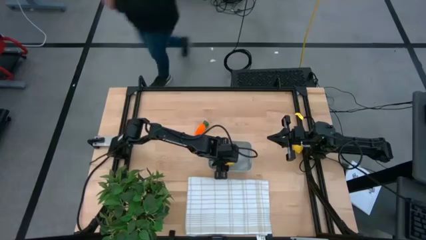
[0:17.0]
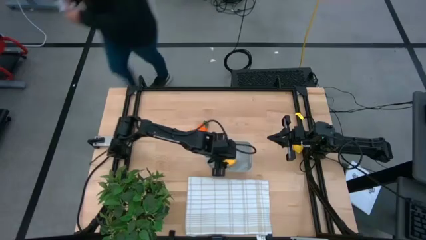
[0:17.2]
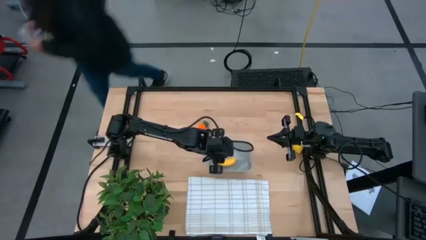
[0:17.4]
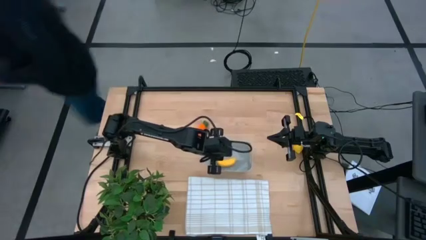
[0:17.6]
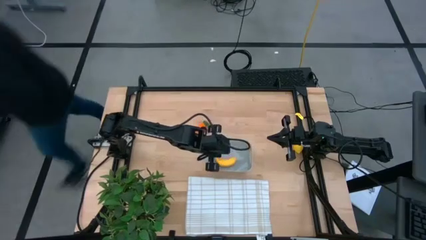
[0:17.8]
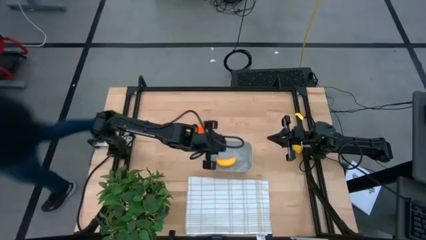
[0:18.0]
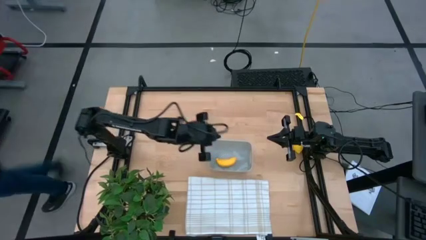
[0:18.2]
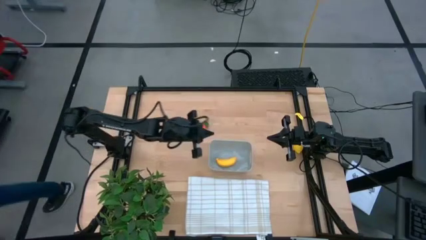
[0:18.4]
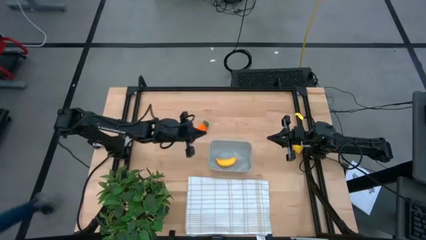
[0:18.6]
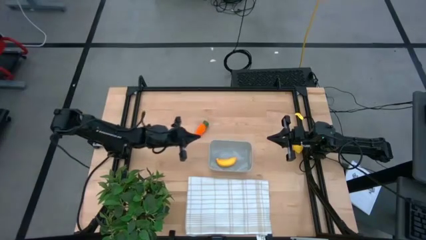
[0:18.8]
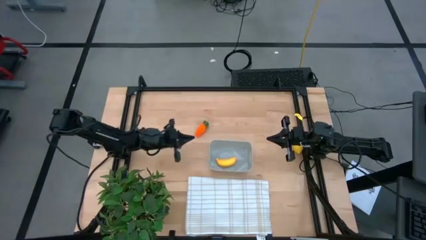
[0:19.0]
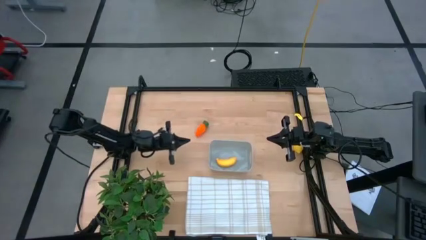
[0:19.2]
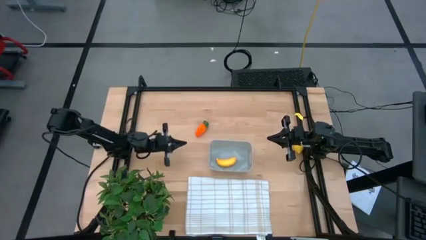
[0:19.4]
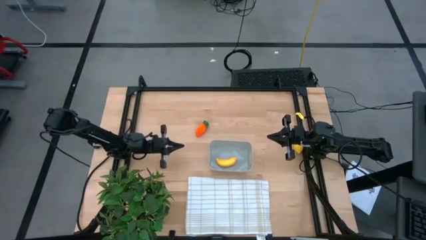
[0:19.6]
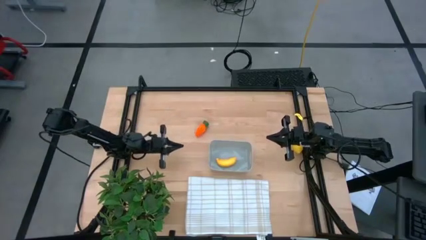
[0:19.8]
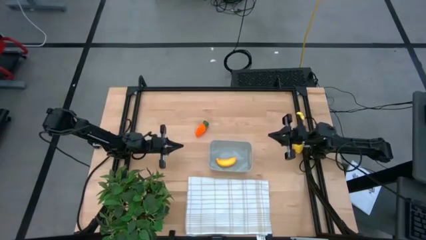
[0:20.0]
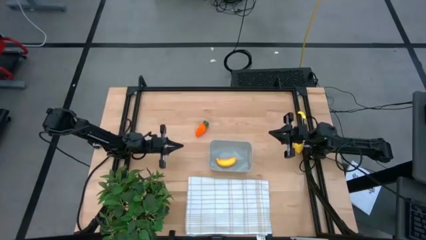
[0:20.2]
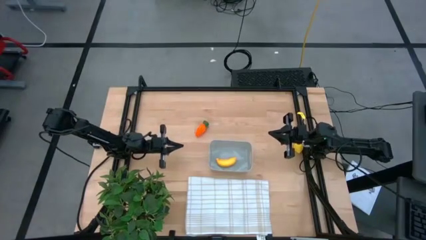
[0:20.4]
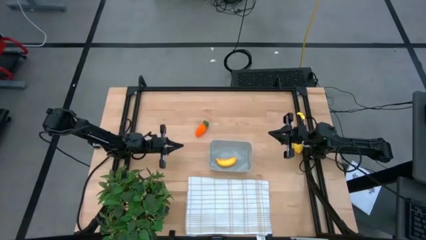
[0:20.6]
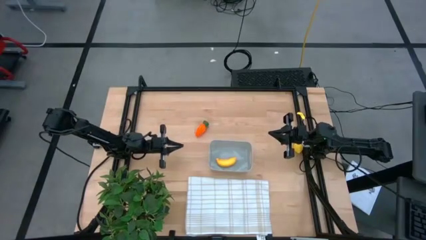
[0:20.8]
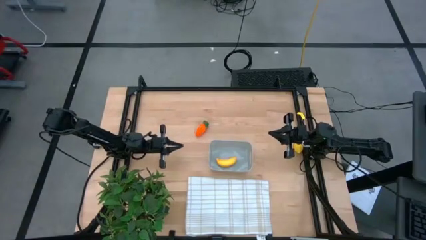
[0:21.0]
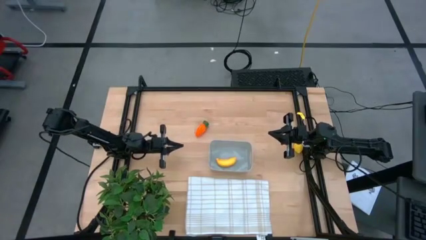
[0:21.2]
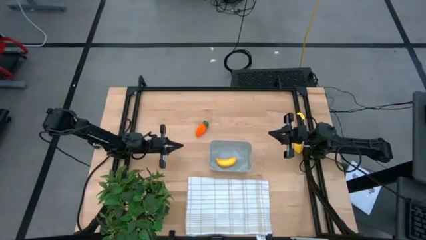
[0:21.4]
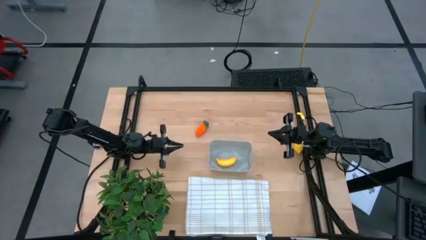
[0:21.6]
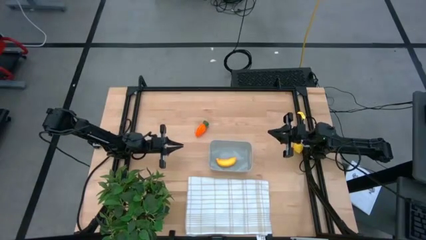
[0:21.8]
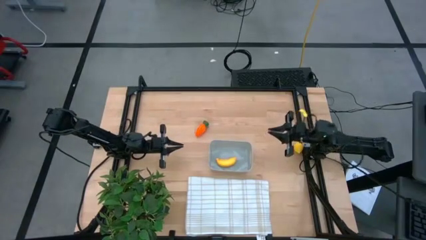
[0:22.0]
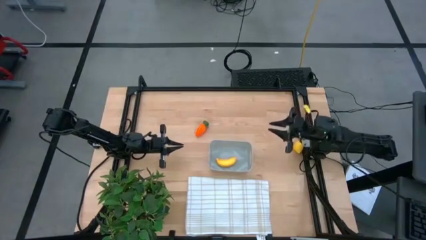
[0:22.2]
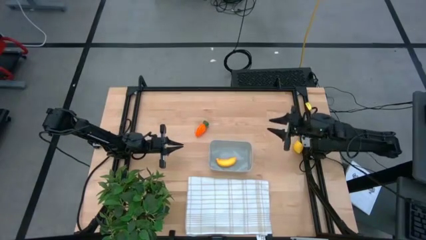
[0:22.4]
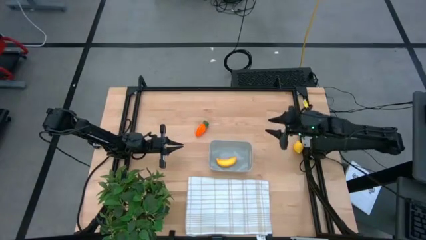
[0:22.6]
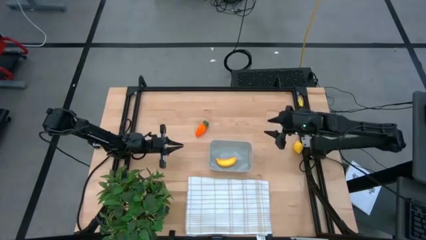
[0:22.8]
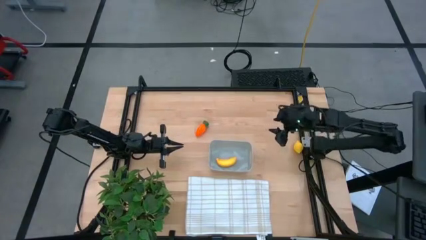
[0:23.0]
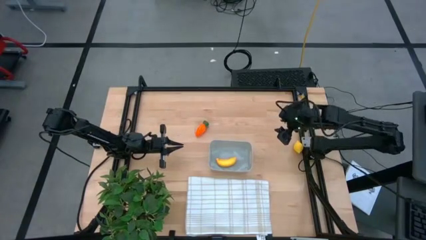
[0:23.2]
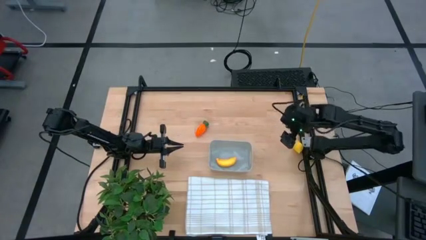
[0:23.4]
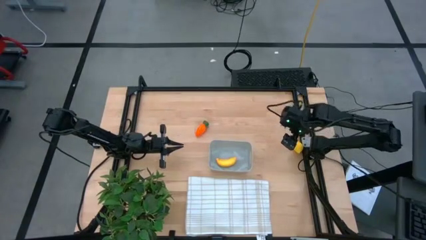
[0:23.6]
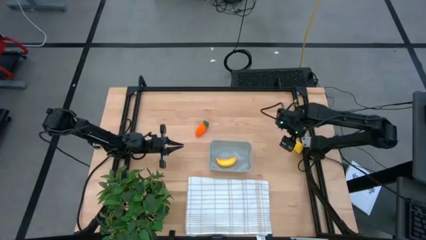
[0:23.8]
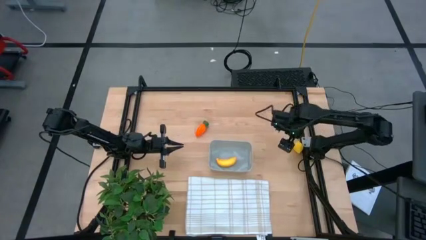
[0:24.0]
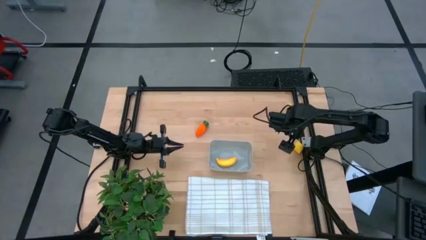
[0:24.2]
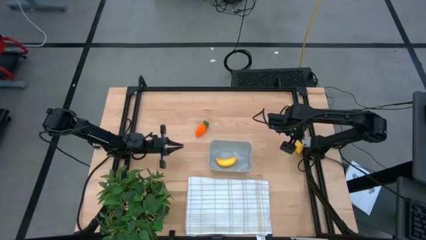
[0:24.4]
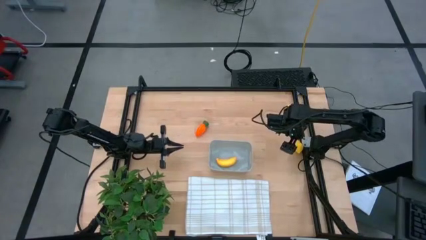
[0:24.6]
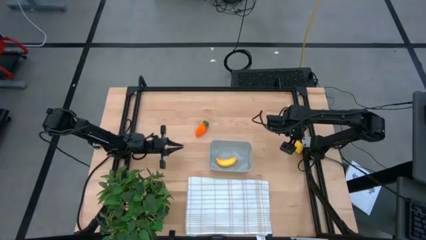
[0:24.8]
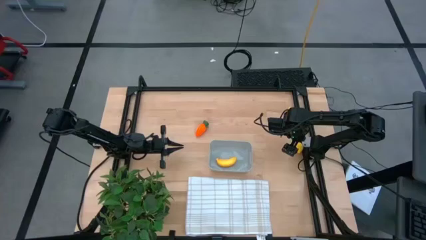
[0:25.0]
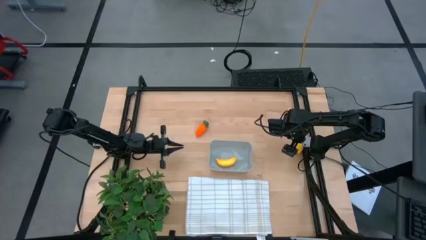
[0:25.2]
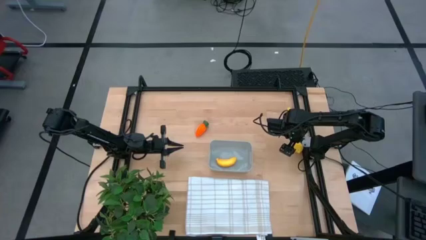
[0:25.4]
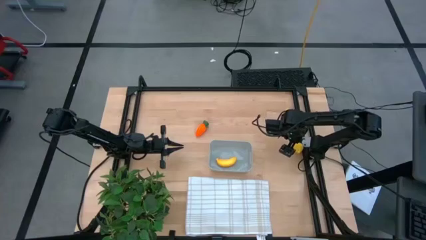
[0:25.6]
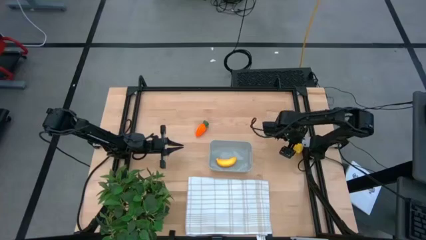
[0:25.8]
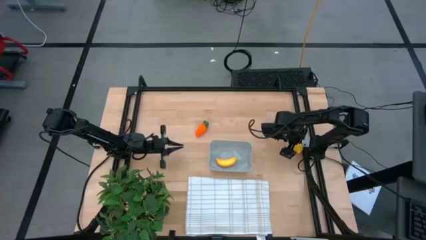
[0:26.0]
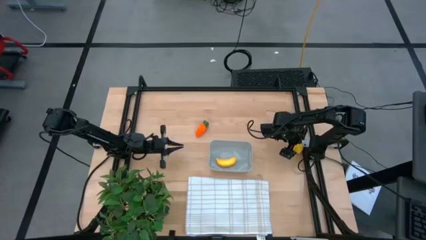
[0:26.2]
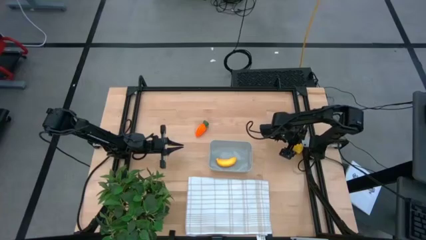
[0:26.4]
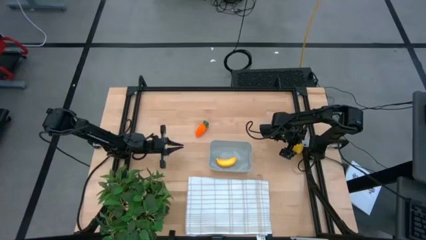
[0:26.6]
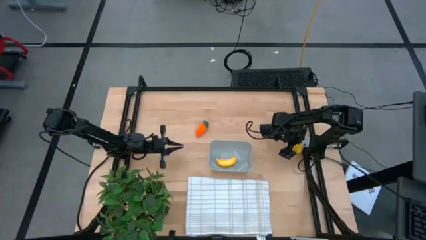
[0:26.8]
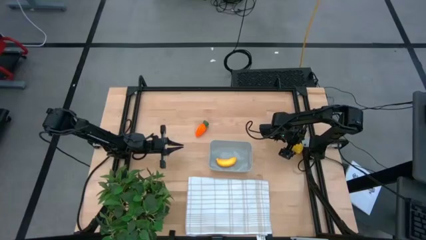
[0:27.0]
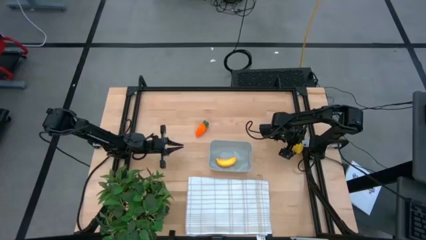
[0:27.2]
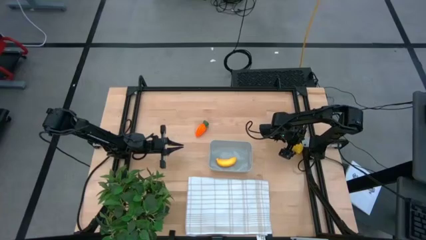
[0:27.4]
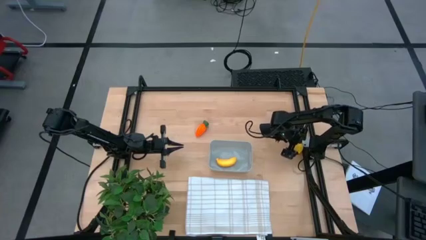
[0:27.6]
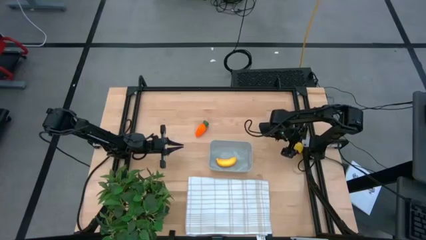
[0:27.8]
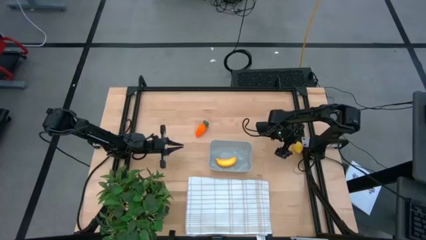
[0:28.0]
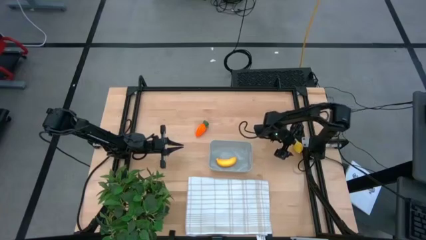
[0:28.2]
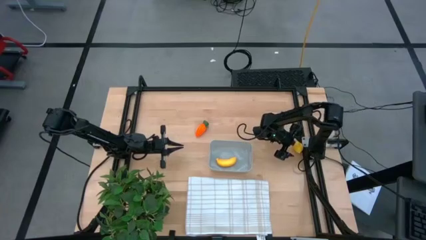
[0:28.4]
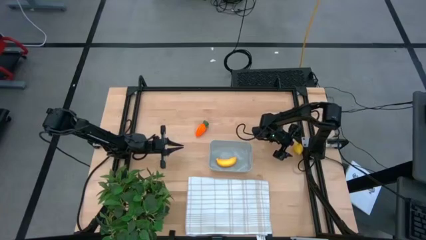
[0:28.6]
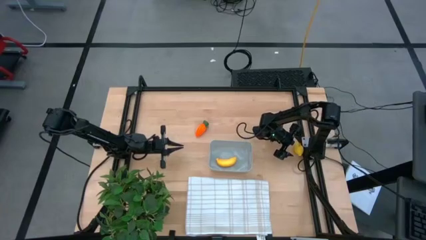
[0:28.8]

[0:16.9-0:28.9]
Task: Pick and placing Produce into tupperware
Put the lemon into the gray bin

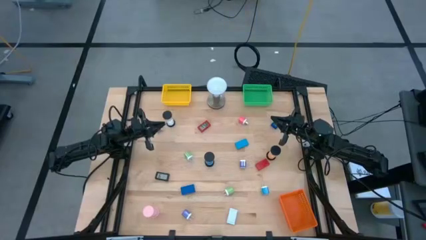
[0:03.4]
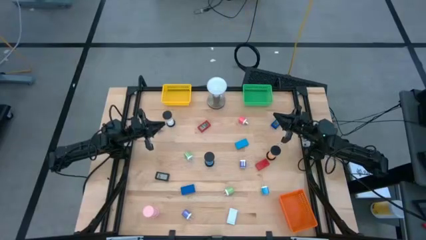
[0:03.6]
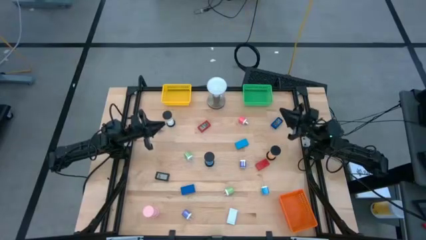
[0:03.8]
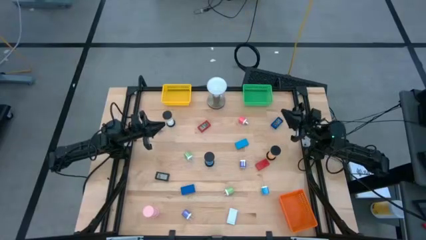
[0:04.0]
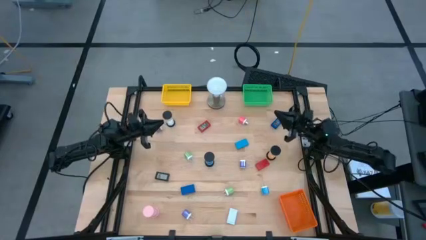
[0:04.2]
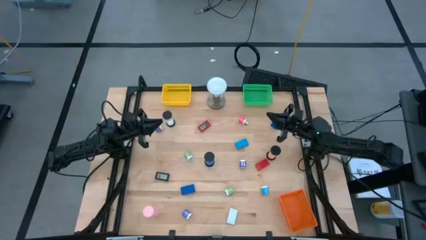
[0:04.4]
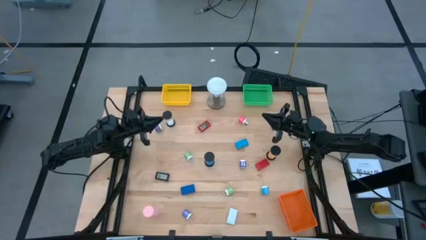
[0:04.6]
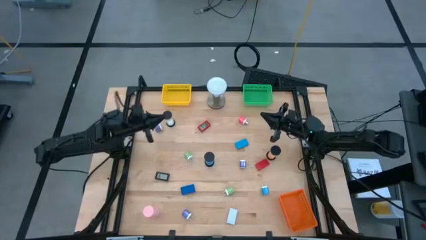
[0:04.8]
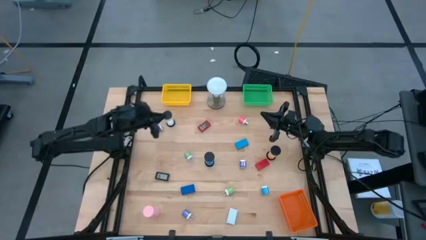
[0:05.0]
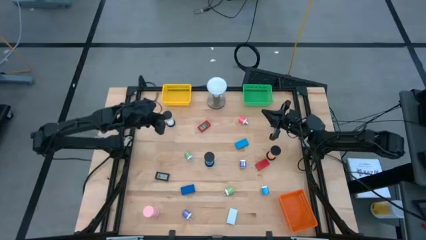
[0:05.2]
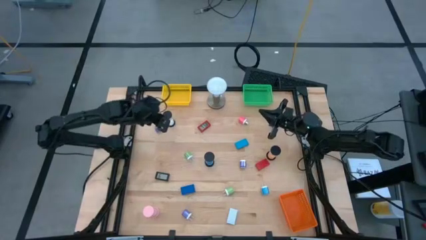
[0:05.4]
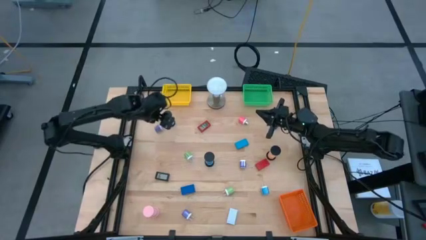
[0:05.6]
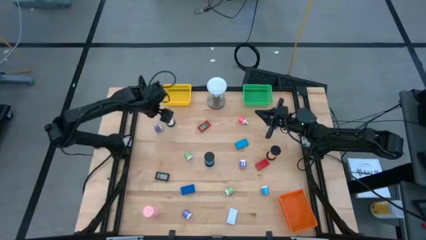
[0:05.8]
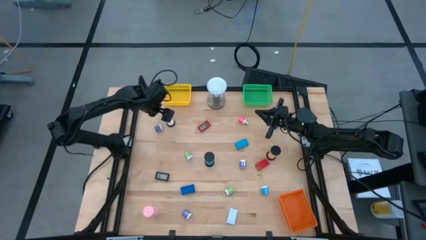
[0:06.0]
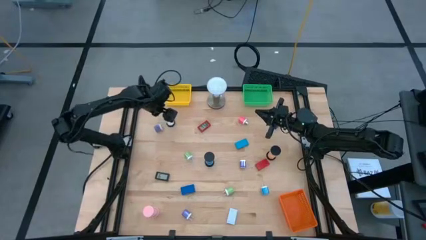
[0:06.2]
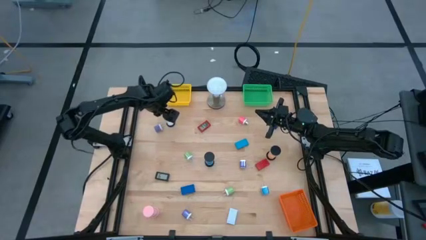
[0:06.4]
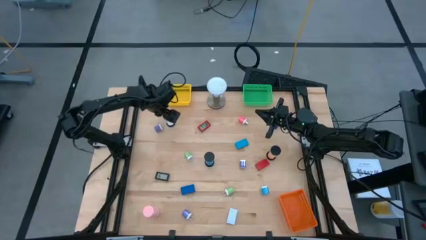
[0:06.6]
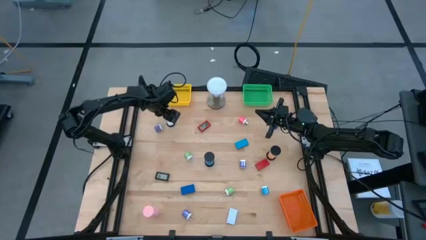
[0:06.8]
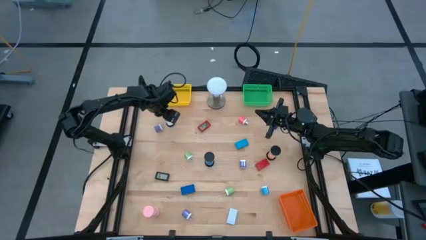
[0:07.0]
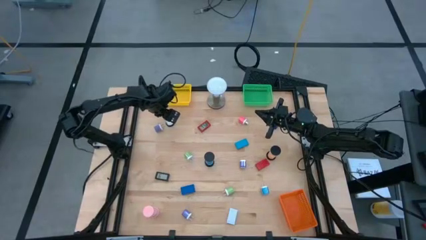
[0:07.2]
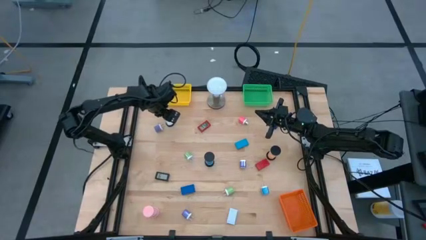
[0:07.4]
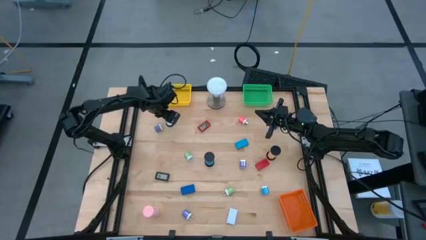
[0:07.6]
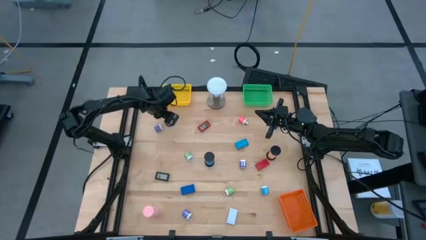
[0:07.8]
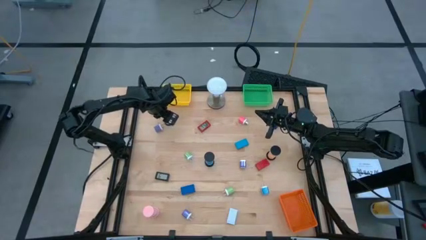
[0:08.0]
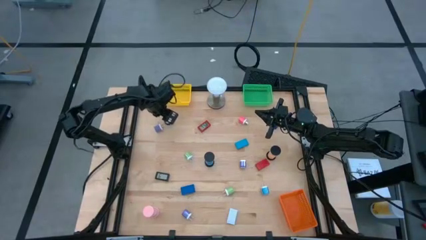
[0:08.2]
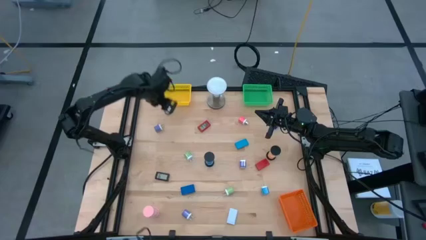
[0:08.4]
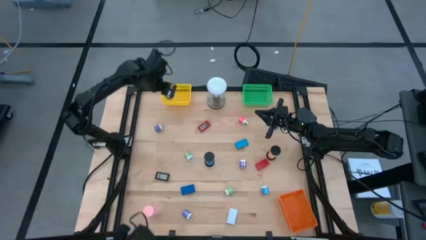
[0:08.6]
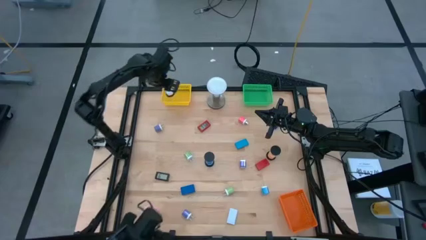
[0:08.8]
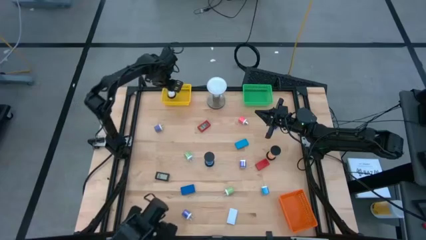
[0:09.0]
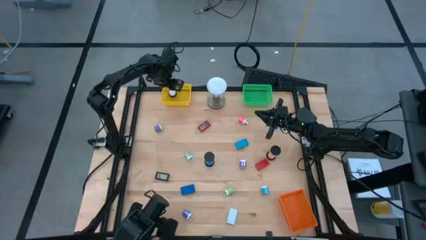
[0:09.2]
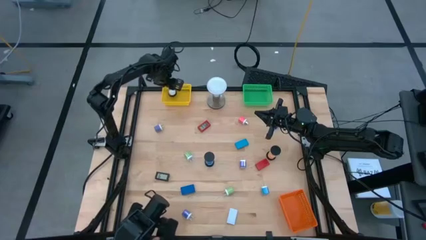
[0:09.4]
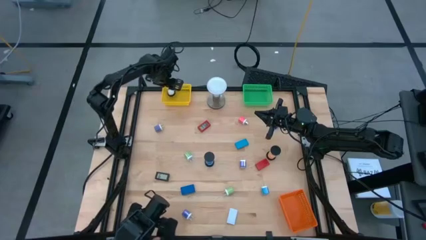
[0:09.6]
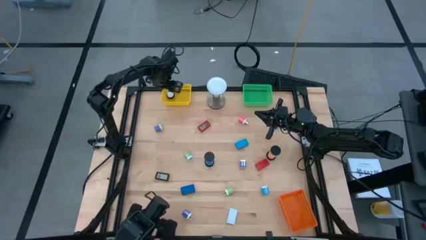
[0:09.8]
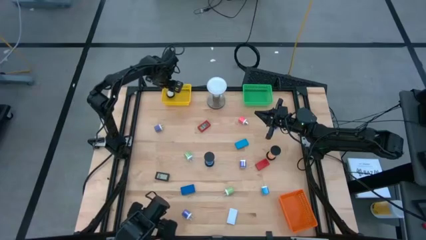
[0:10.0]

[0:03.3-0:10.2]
Task: Pick & Place Office items
Put the white hourglass into the yellow bin
